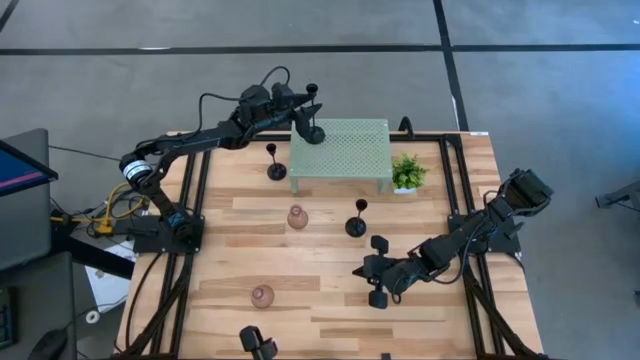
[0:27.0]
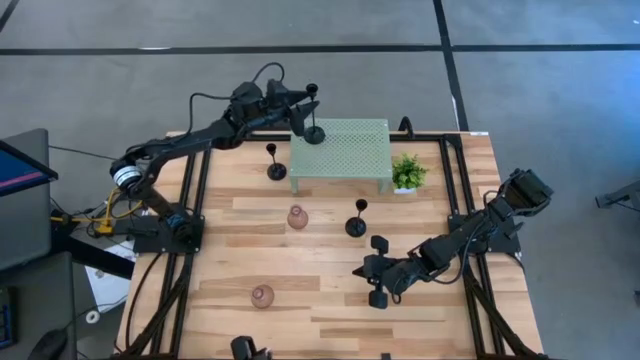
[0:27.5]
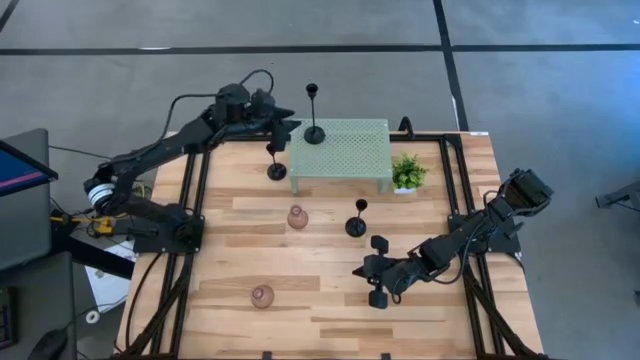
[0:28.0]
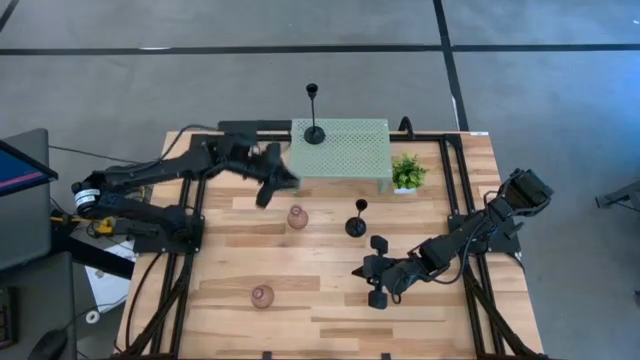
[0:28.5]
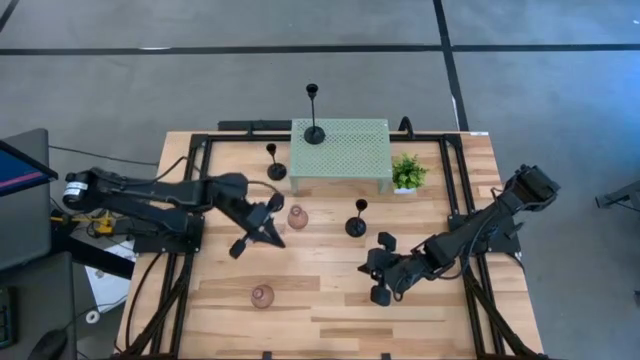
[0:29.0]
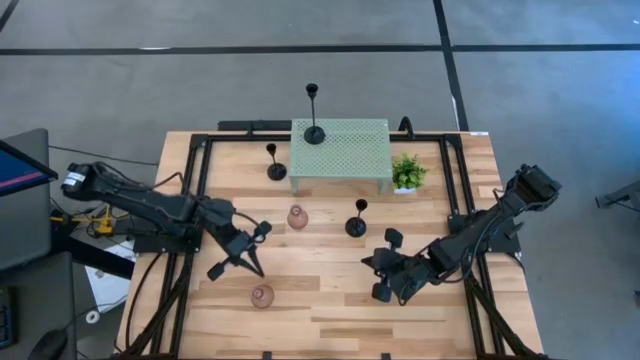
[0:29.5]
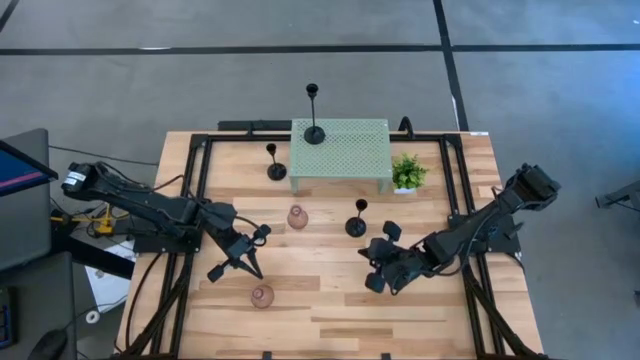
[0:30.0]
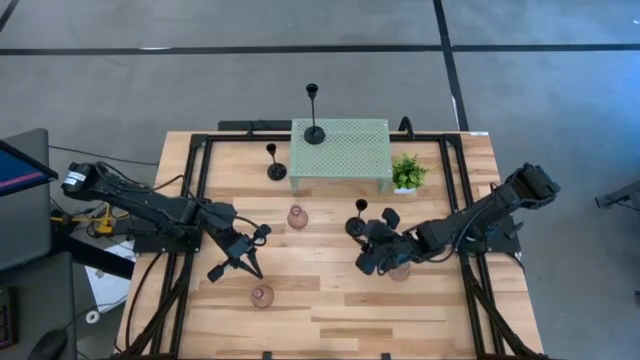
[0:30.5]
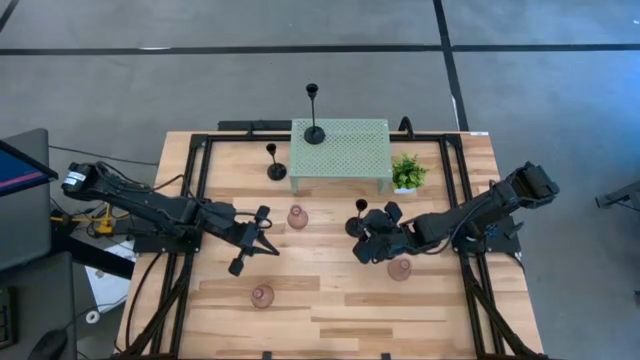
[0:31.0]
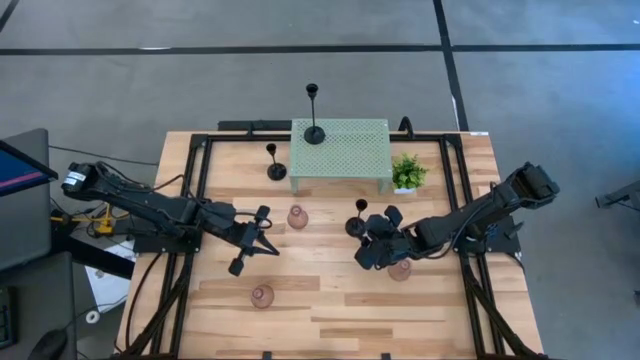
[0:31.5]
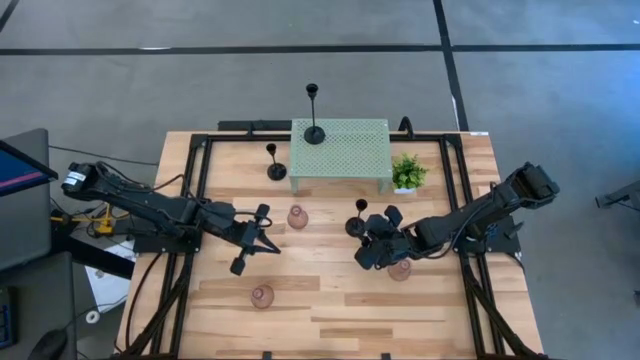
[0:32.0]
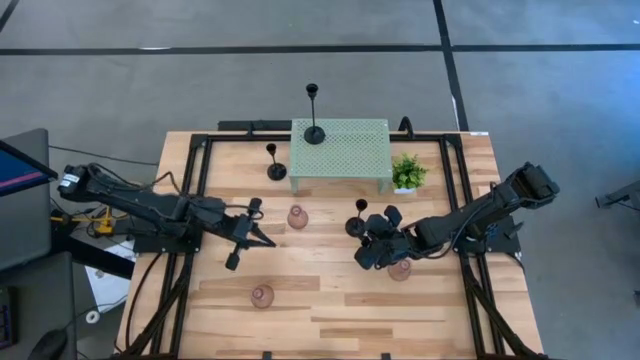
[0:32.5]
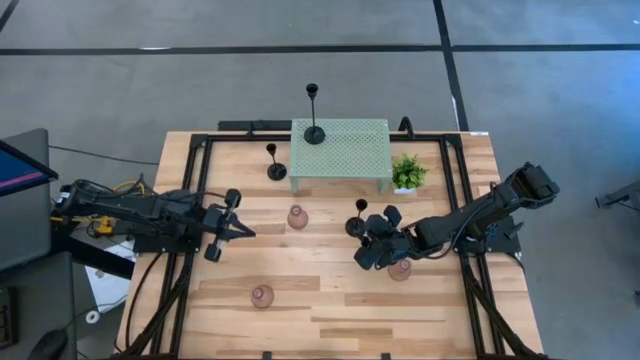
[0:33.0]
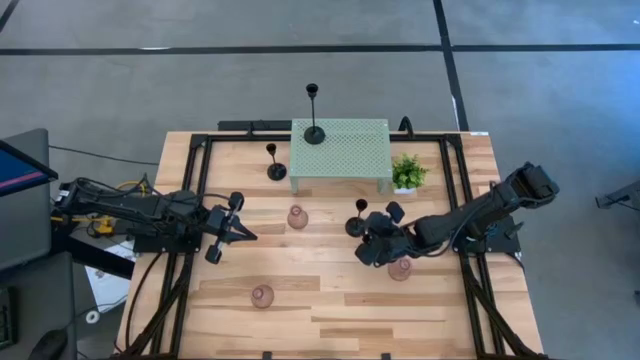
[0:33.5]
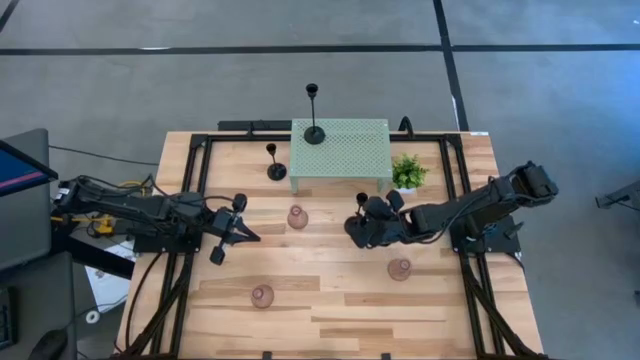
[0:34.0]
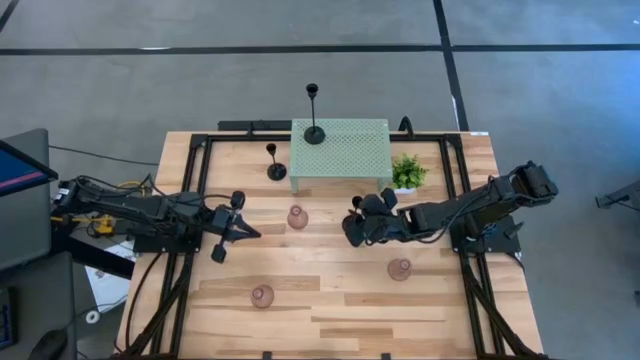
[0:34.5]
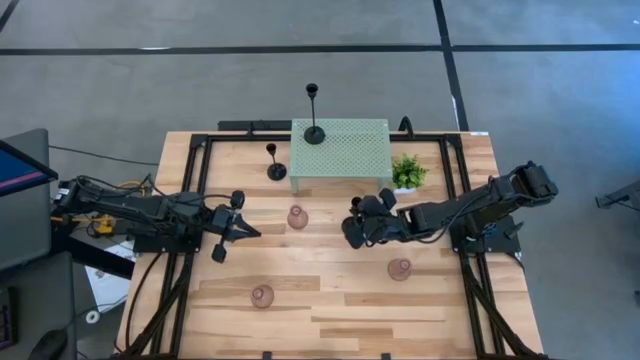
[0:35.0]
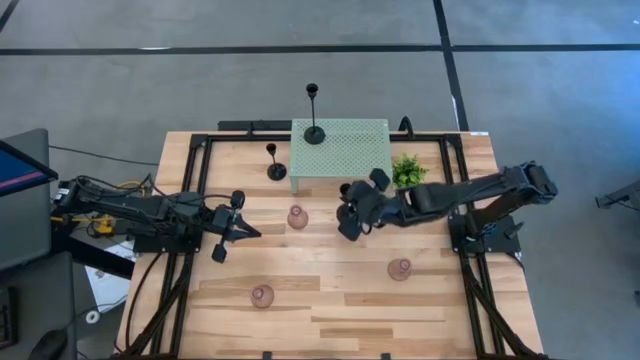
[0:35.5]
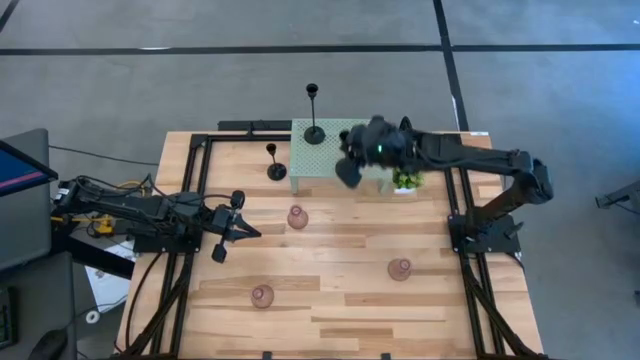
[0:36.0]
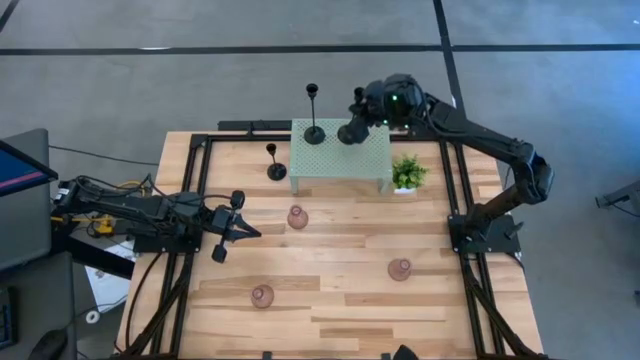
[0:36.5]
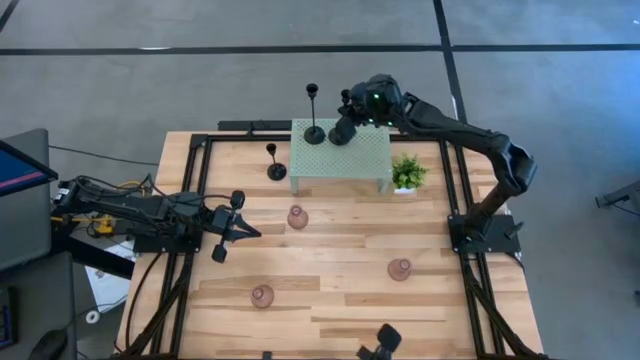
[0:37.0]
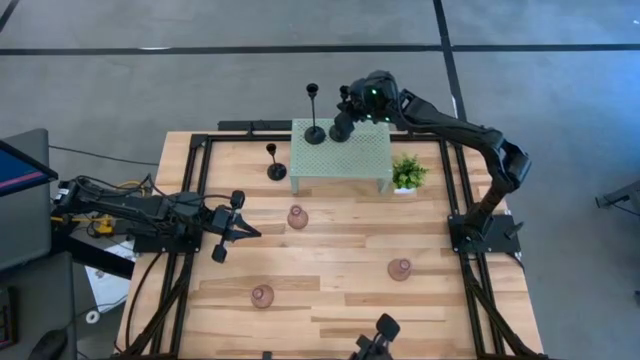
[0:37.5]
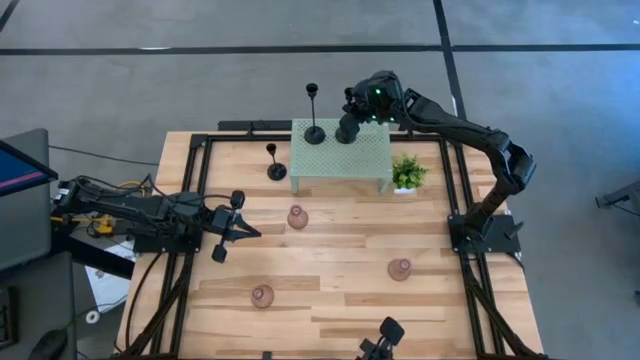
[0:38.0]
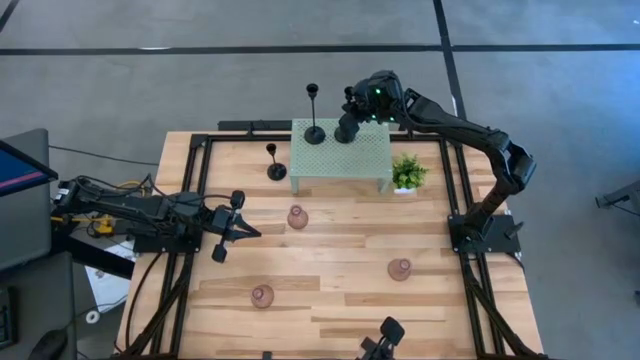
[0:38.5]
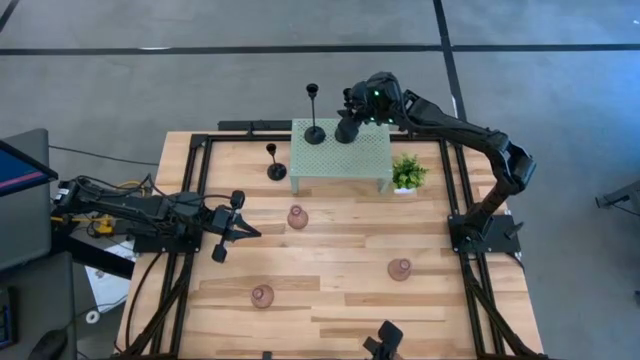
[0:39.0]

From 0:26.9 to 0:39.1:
Task: Pick & Place candle stick holders
Put the bottom black candle holder on the shelf aligned with the black candle holder
